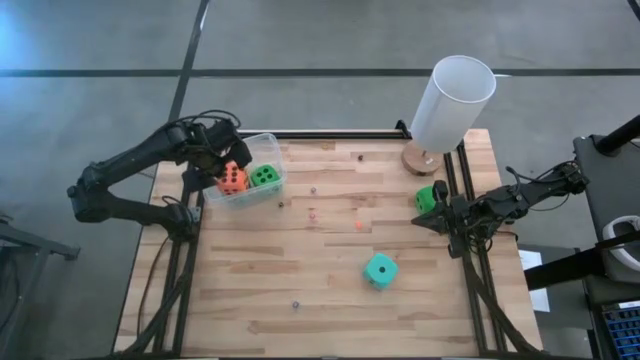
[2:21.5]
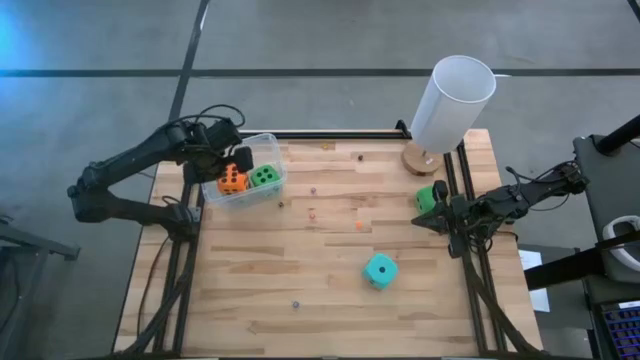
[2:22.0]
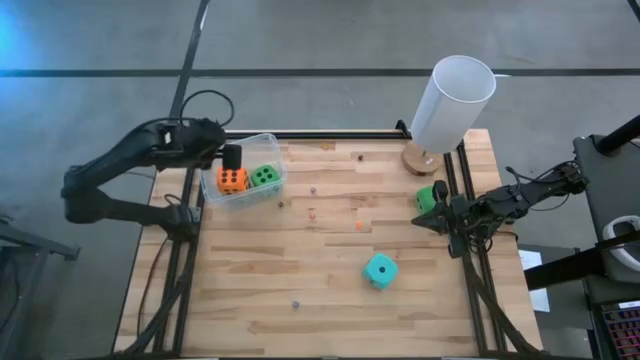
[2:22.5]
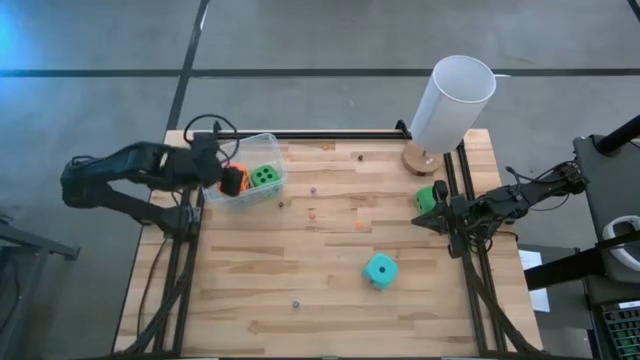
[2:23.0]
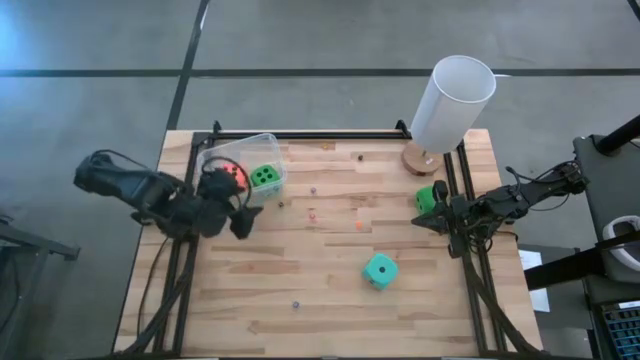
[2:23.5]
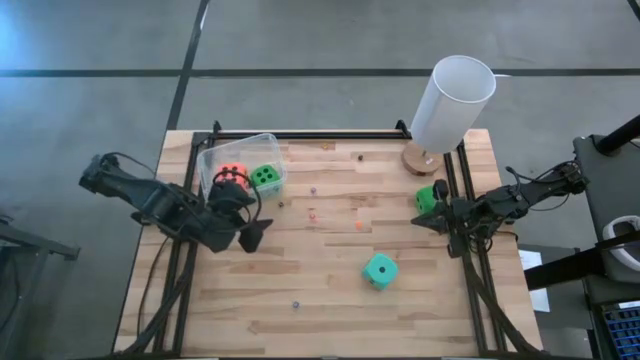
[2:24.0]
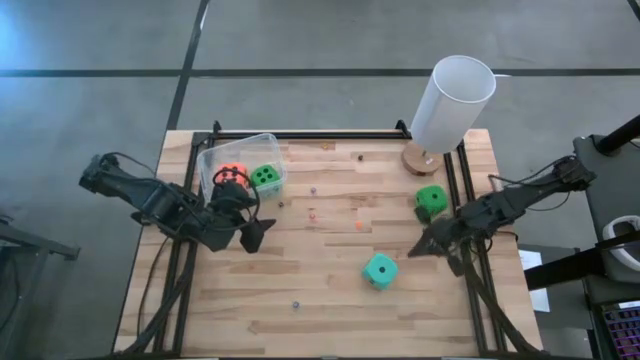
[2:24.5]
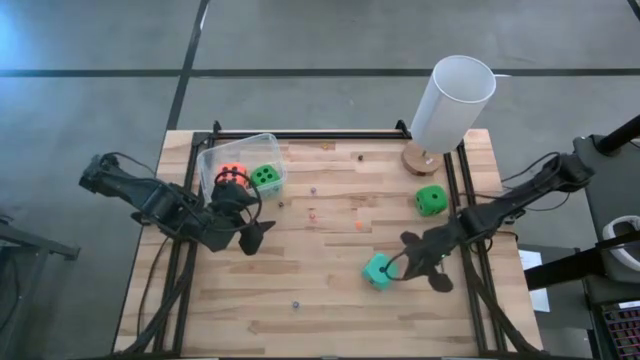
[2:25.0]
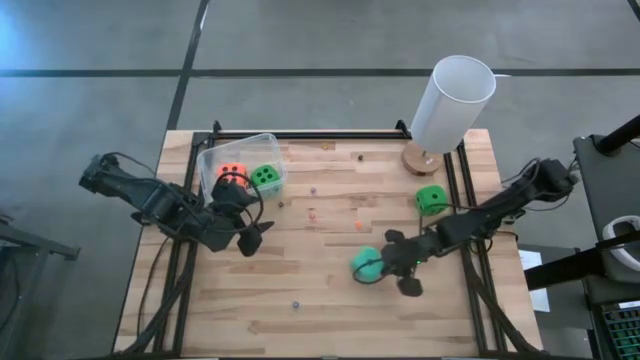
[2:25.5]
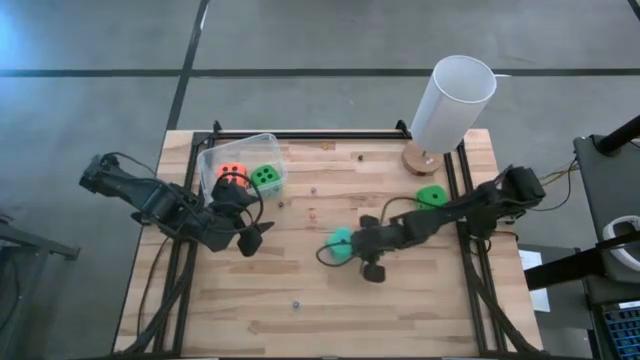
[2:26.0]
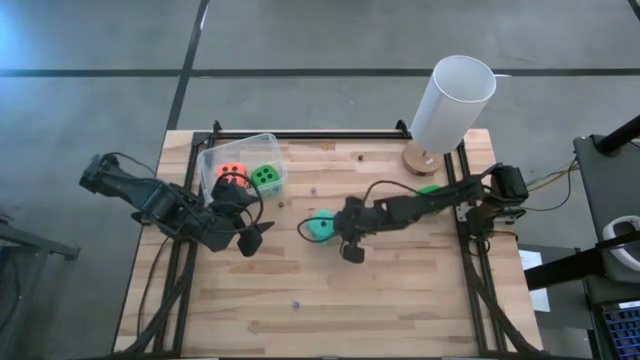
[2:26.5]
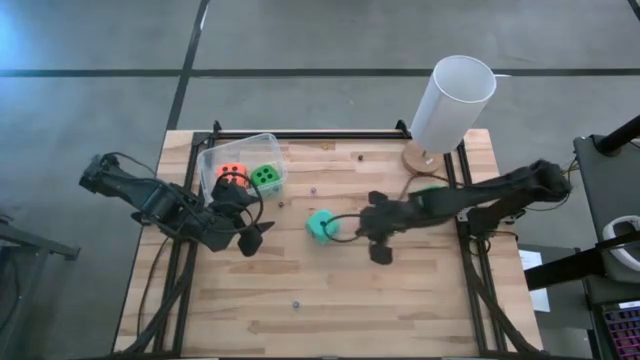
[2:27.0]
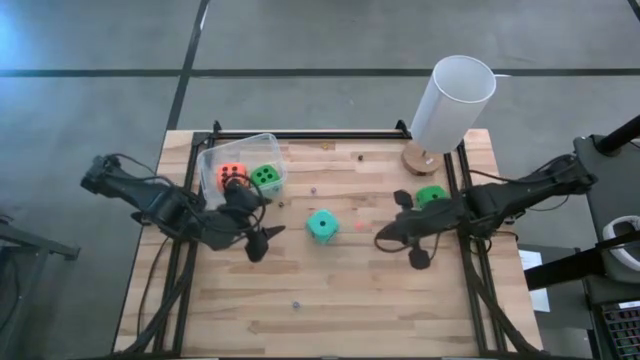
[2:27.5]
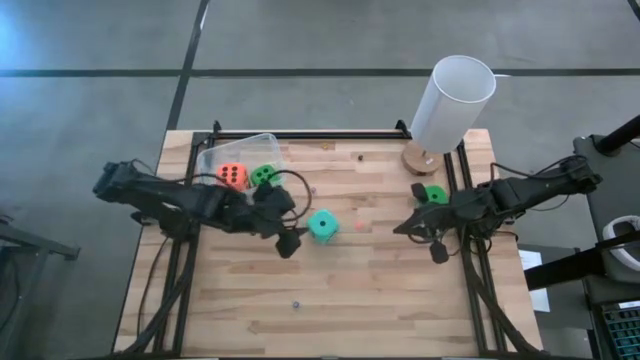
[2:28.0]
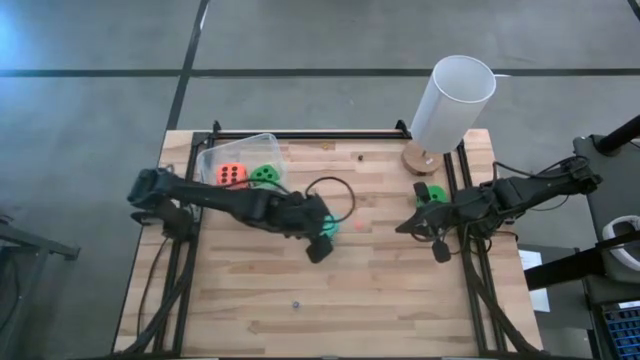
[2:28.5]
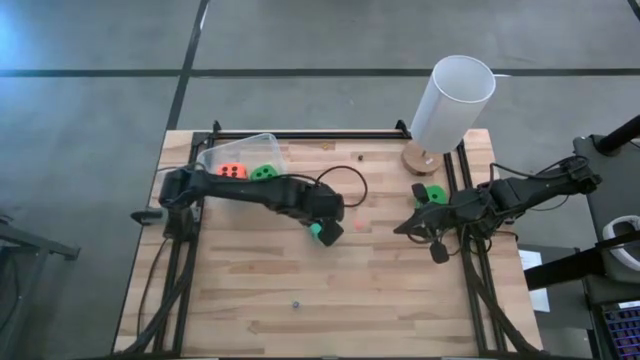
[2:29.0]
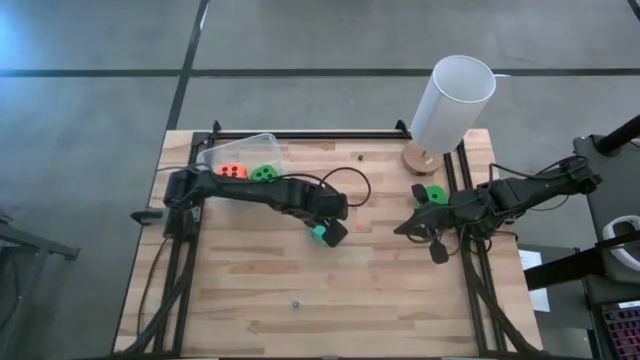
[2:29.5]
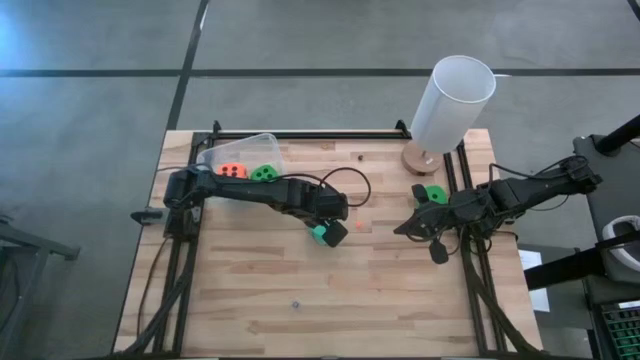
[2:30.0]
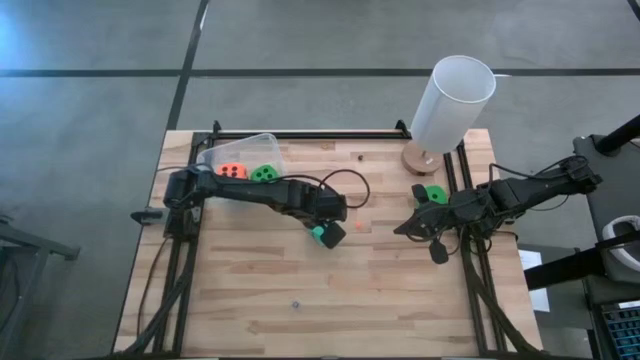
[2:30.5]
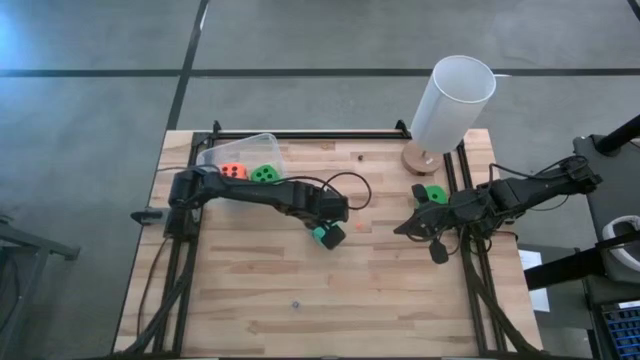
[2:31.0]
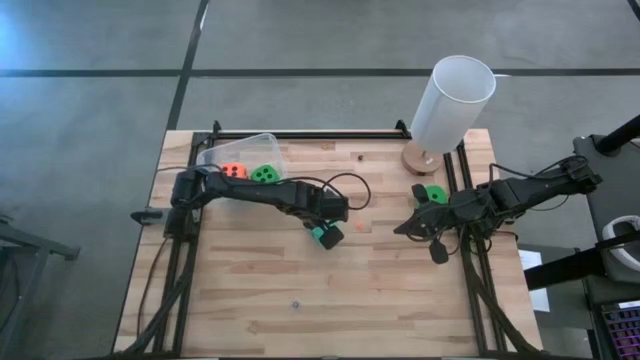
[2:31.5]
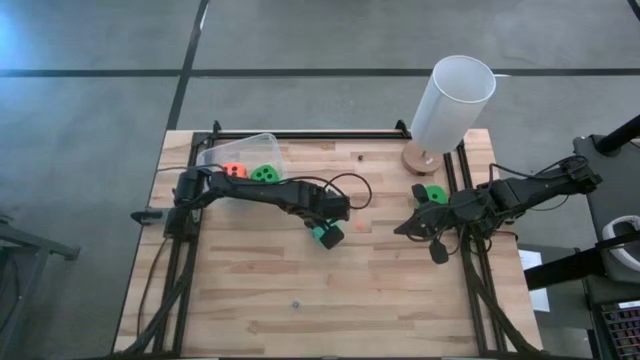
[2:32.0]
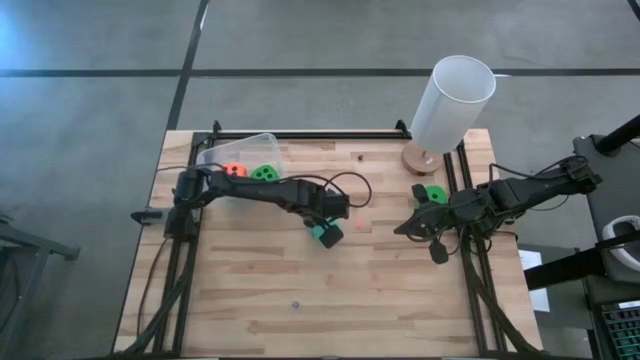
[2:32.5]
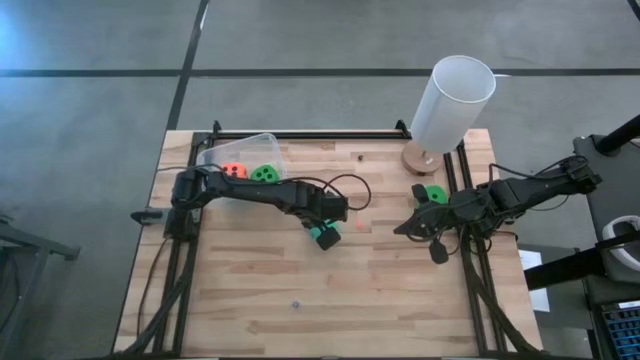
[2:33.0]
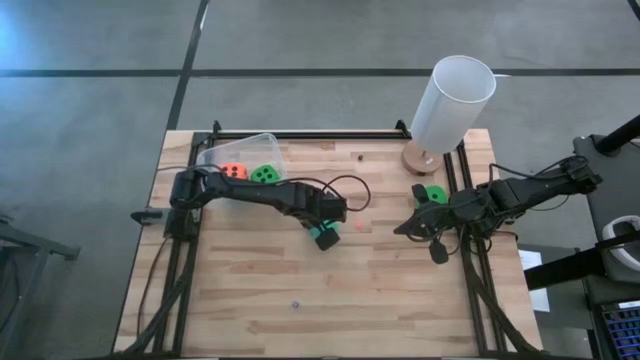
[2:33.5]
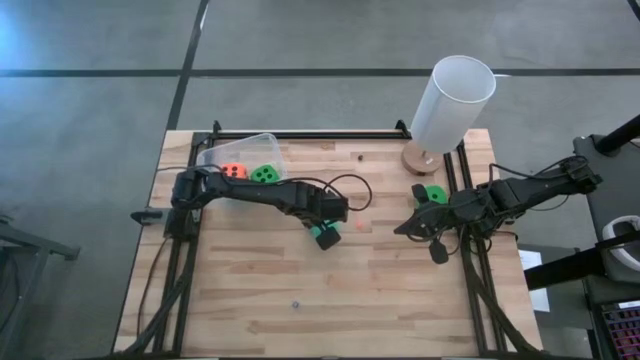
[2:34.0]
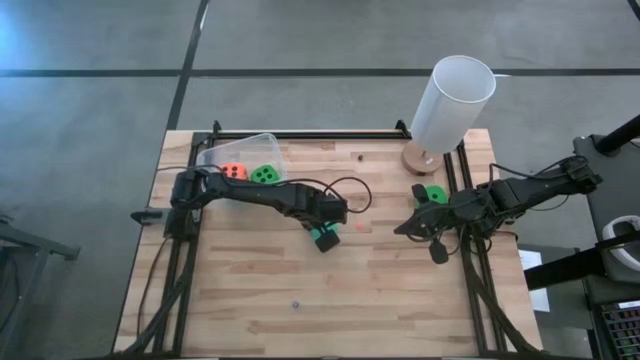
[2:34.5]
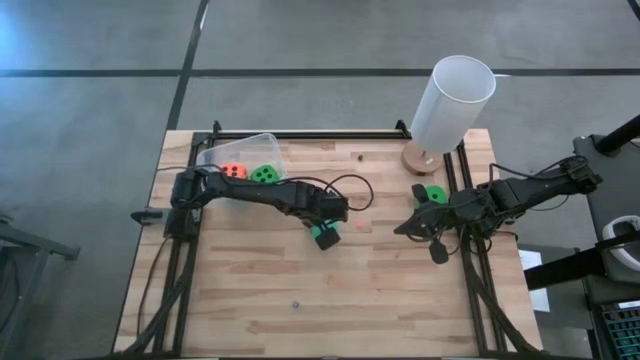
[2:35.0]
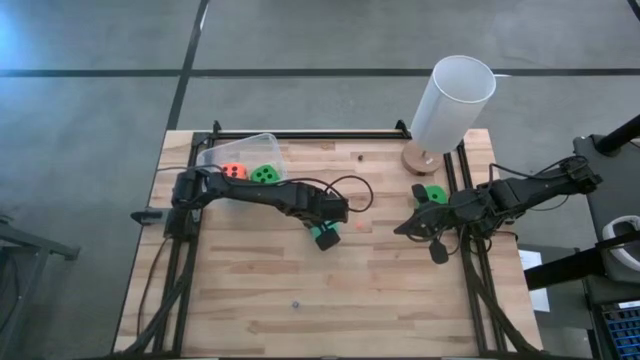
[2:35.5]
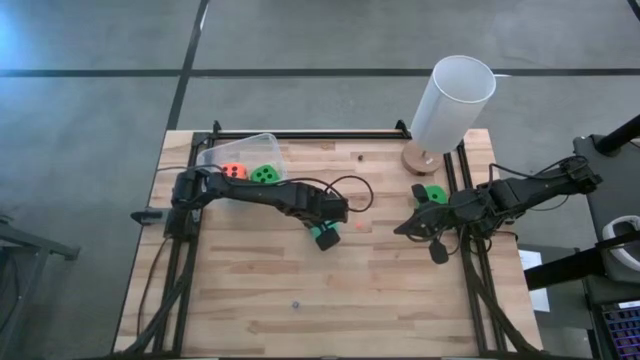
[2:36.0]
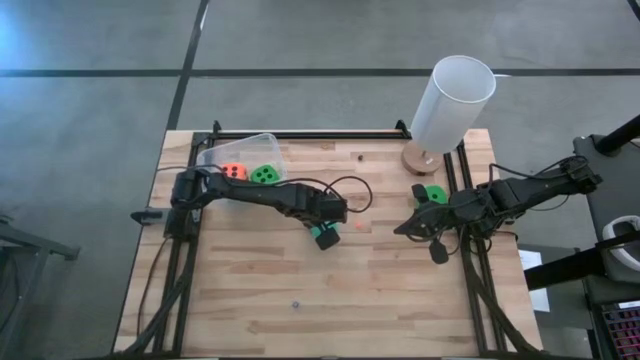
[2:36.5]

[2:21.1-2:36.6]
Task: Pick & Place Dice
Put the blue large dice into the transparent bin

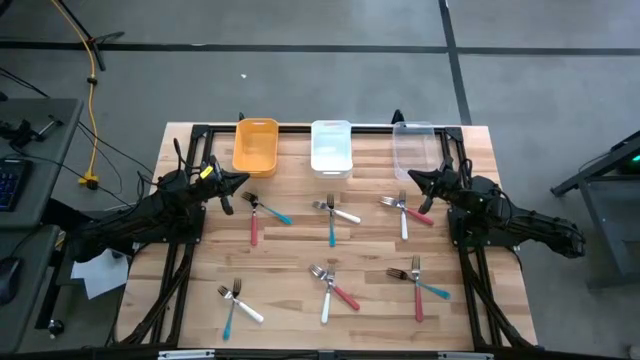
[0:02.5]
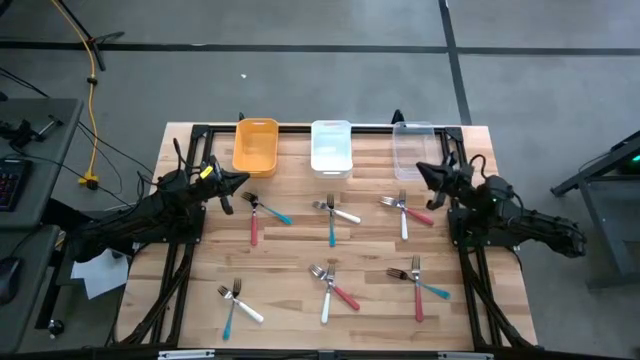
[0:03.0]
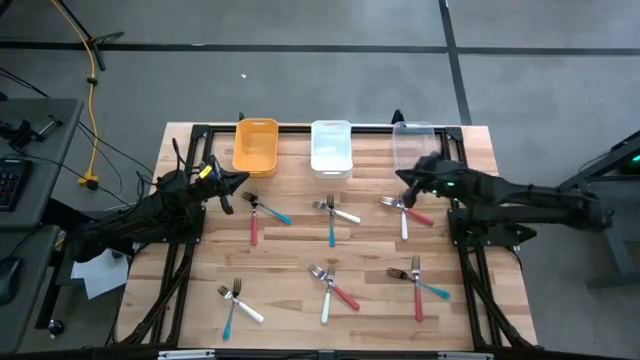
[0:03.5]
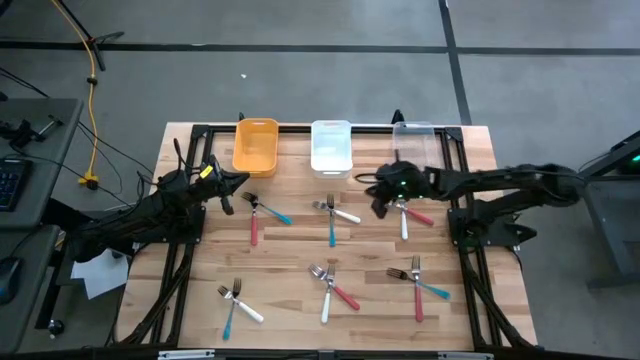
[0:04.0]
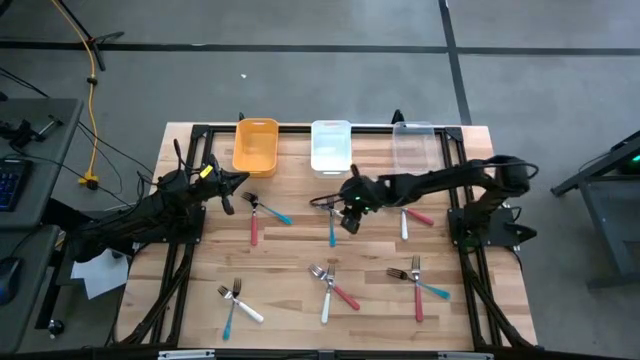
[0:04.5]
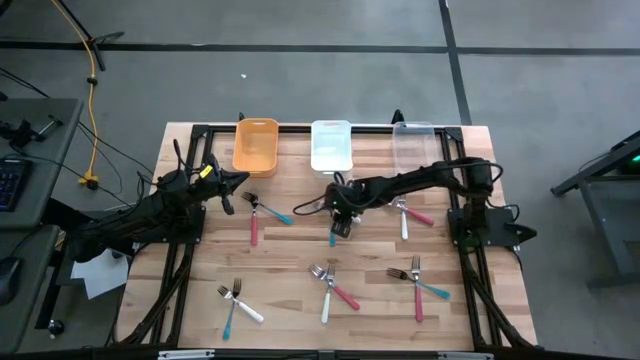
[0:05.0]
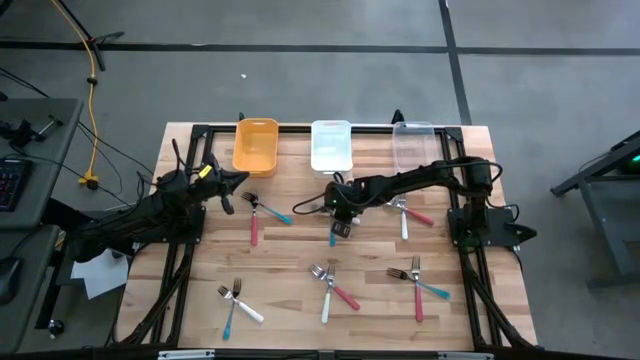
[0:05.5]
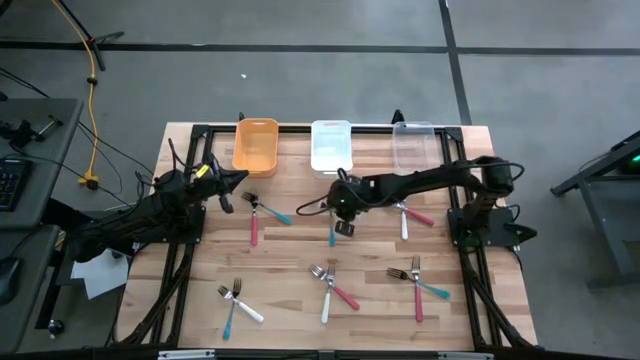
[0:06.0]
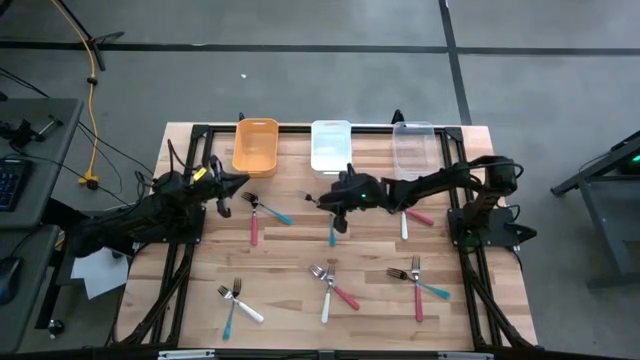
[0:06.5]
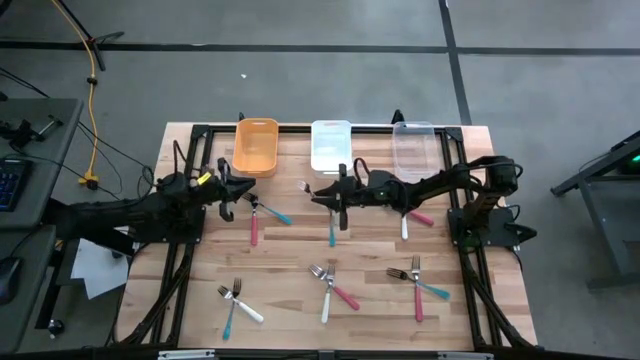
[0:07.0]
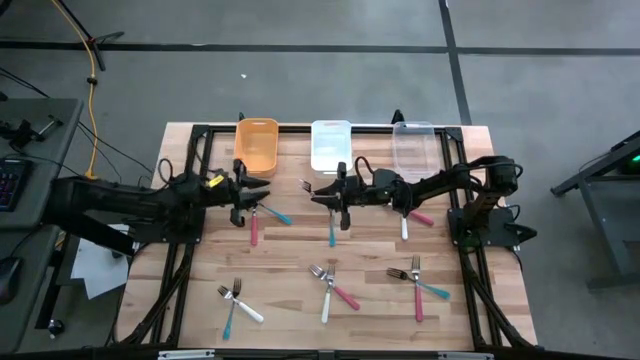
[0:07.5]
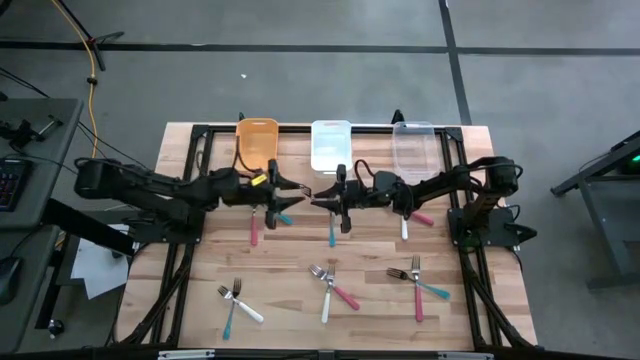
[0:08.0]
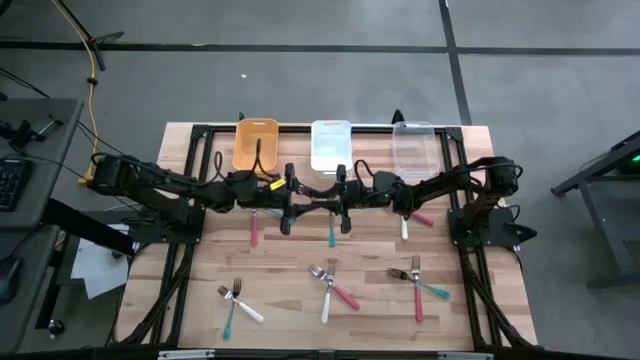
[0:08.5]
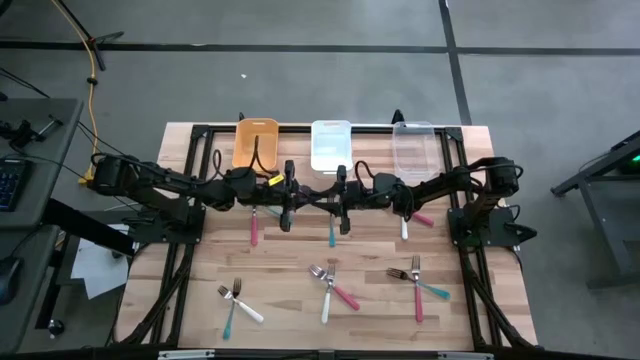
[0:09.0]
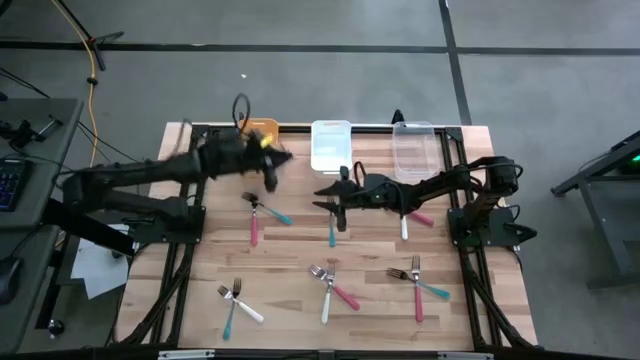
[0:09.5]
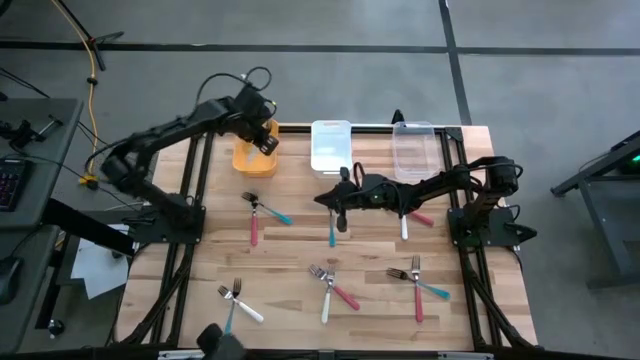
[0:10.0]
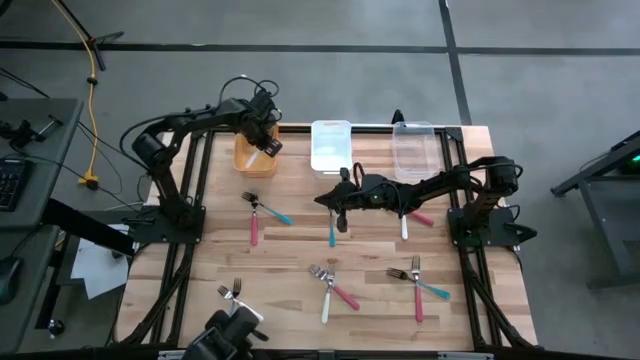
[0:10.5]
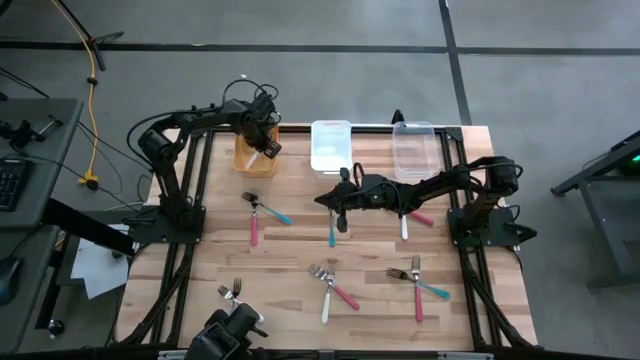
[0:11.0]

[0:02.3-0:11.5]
Task: Sort silverware by color (type)
Put the top left white fork into the yellow bin
